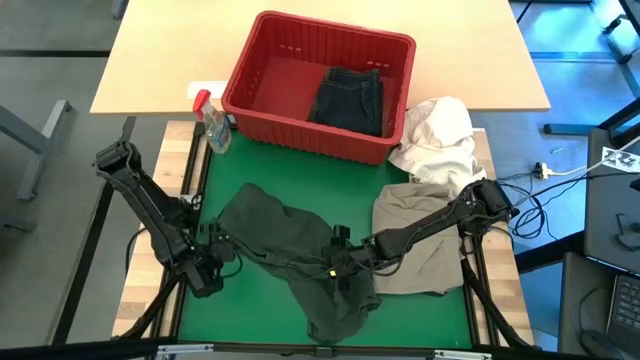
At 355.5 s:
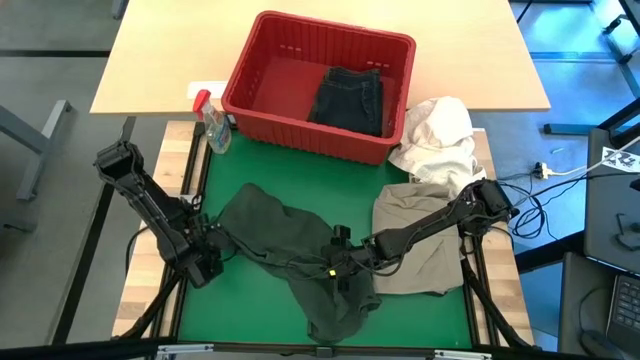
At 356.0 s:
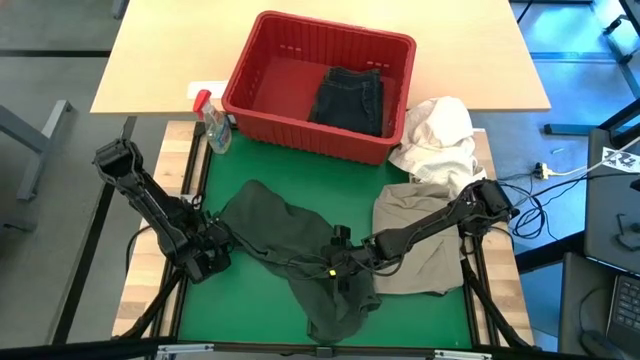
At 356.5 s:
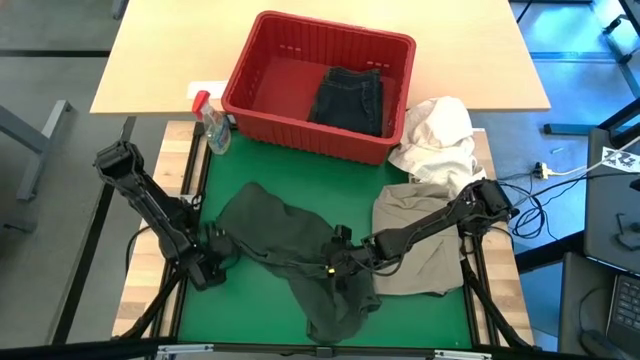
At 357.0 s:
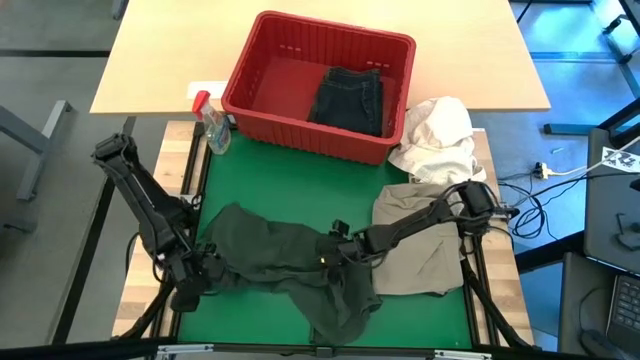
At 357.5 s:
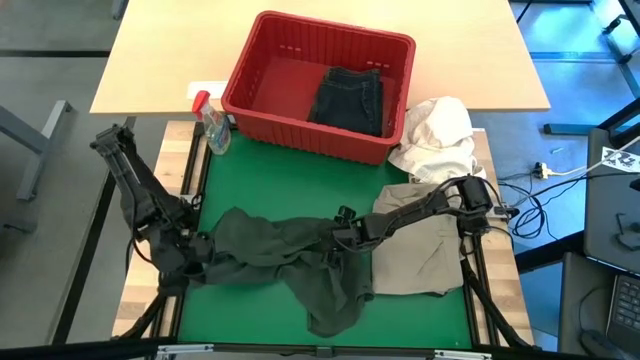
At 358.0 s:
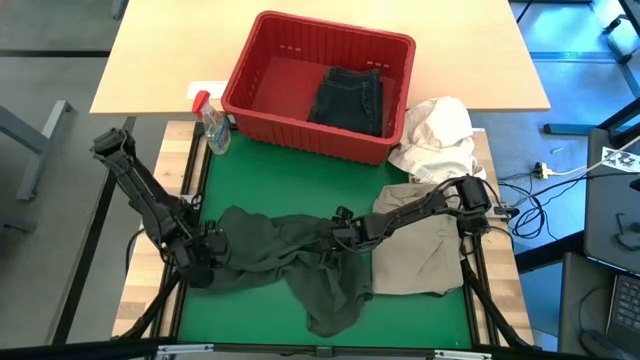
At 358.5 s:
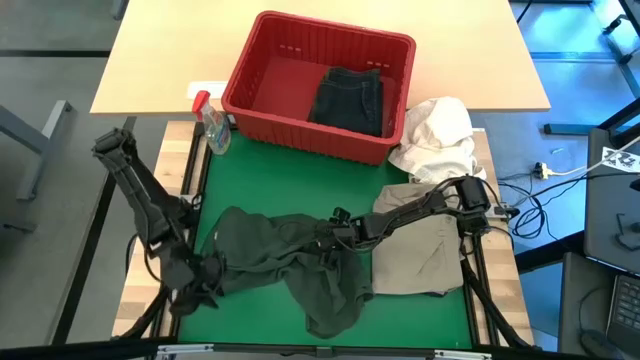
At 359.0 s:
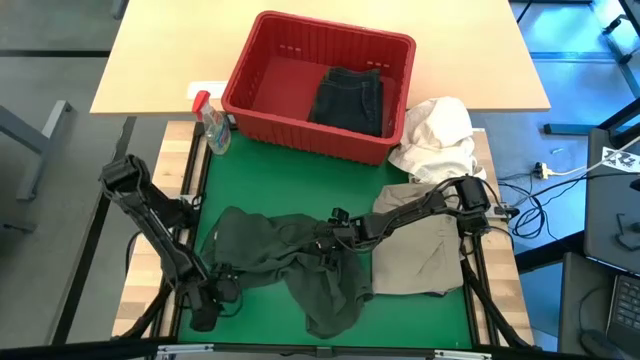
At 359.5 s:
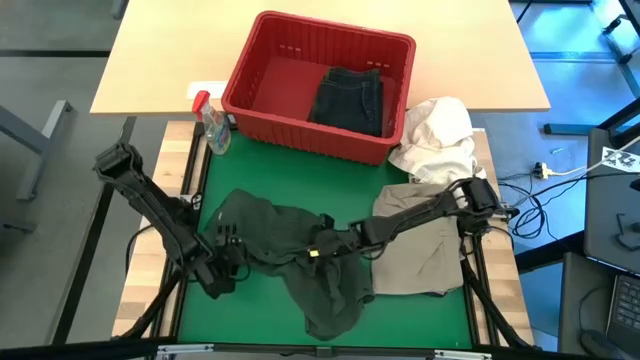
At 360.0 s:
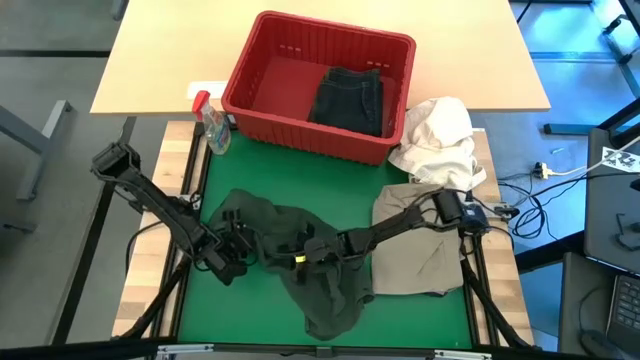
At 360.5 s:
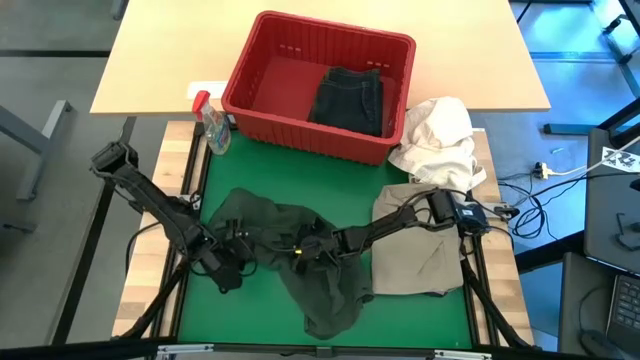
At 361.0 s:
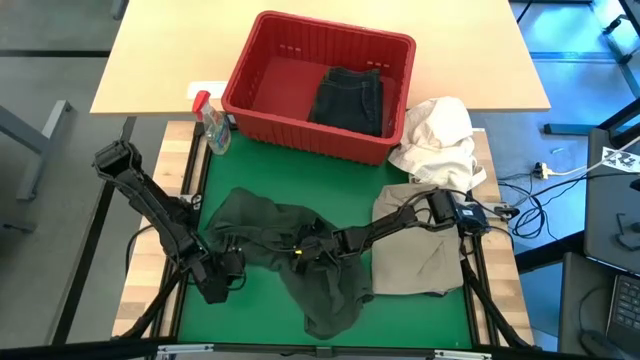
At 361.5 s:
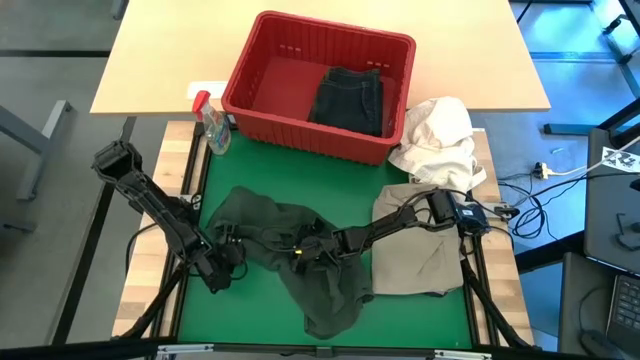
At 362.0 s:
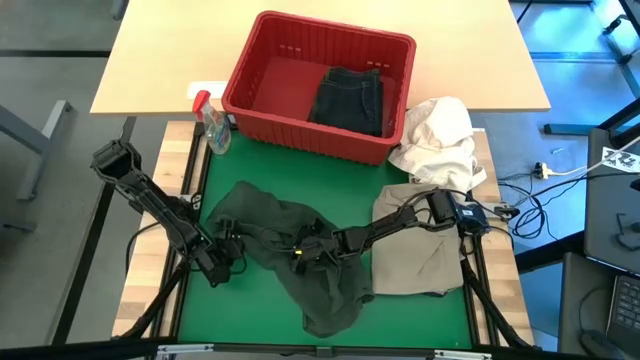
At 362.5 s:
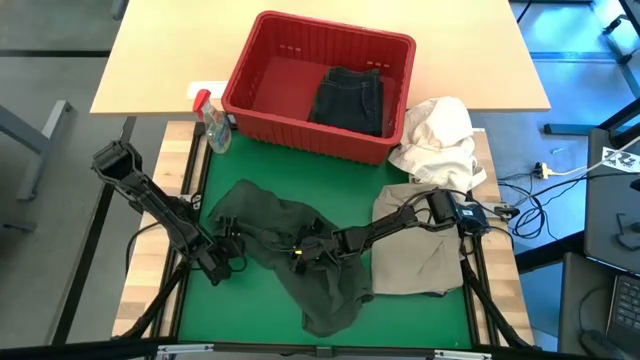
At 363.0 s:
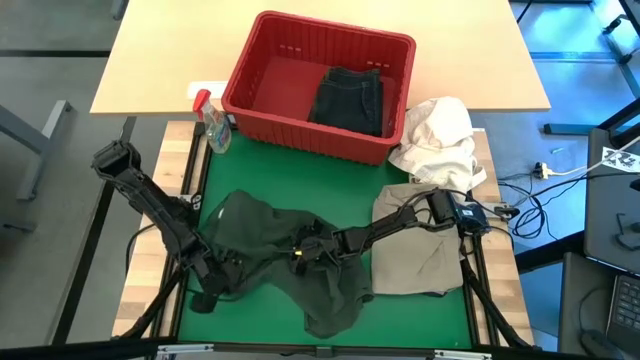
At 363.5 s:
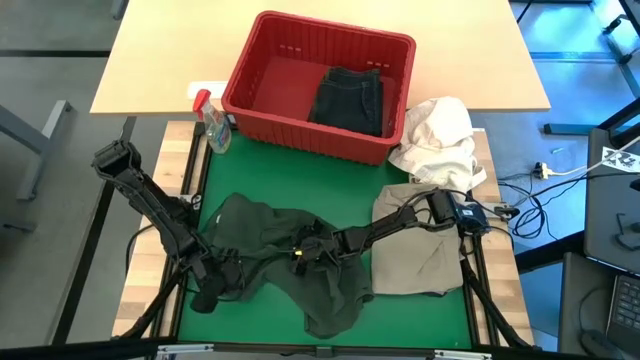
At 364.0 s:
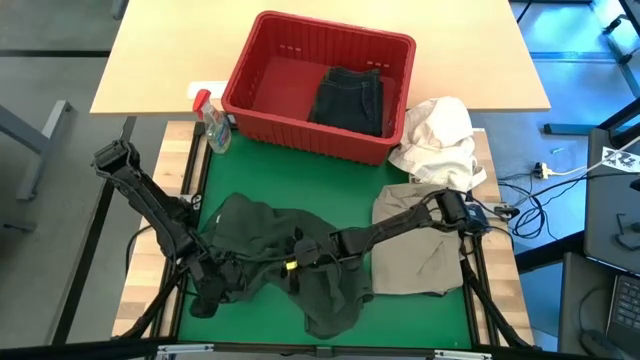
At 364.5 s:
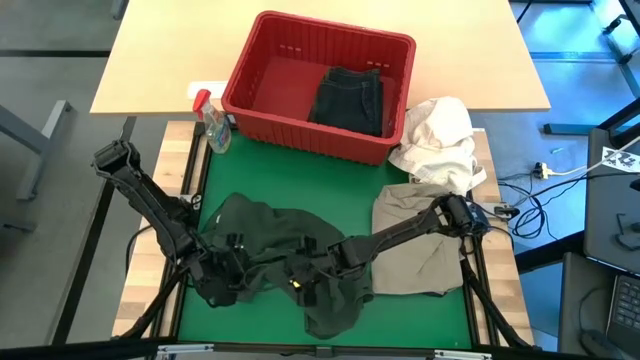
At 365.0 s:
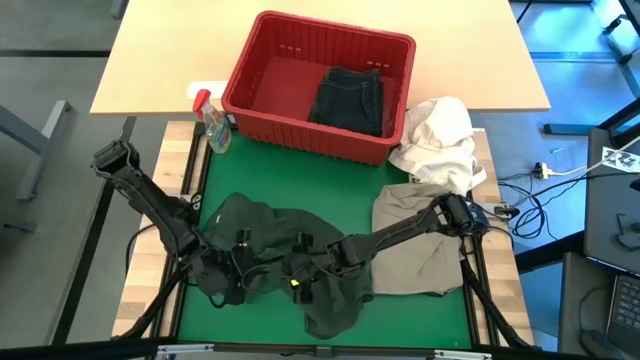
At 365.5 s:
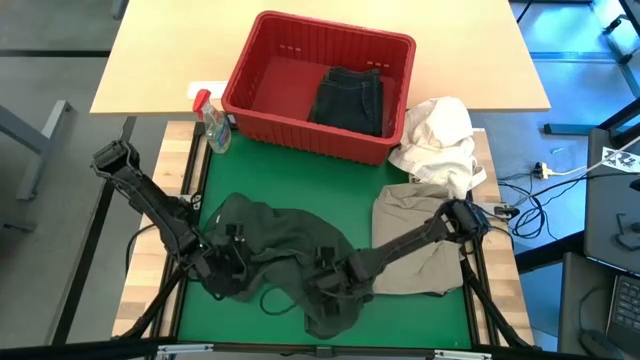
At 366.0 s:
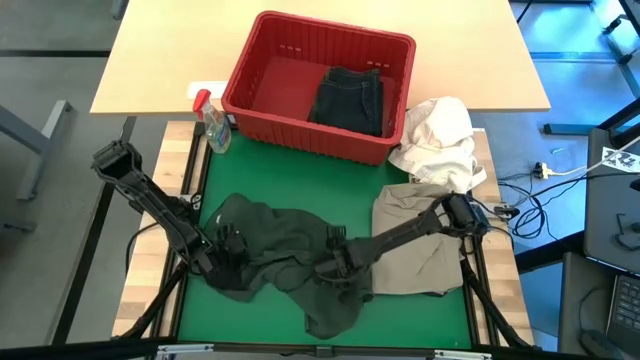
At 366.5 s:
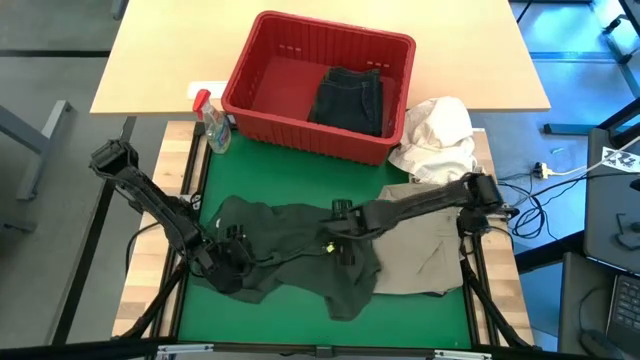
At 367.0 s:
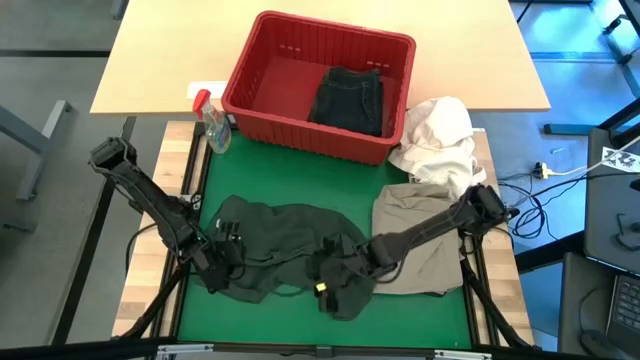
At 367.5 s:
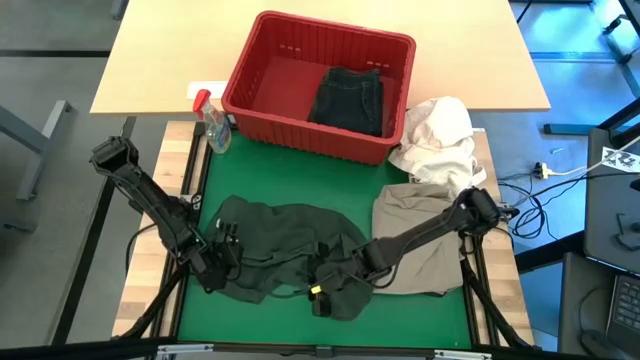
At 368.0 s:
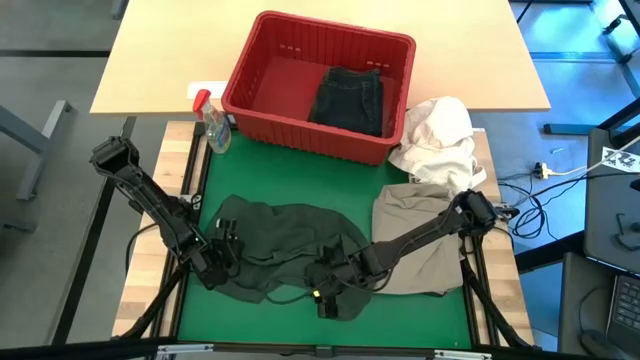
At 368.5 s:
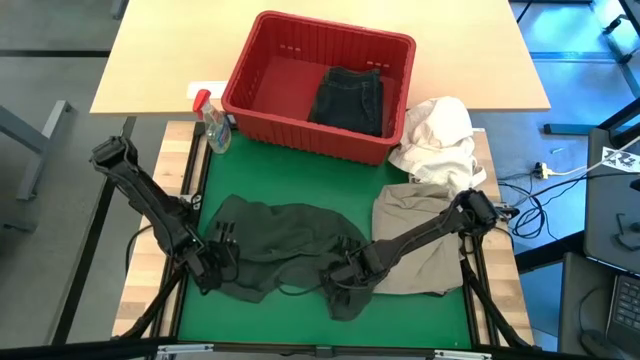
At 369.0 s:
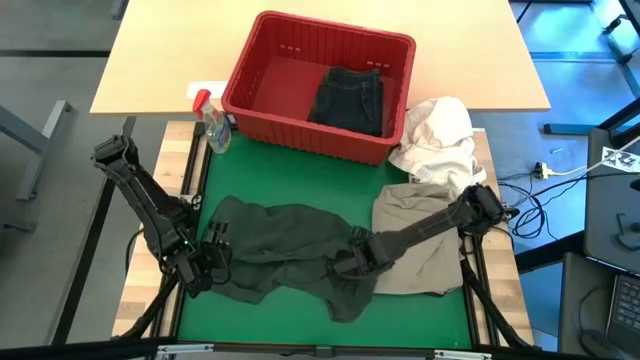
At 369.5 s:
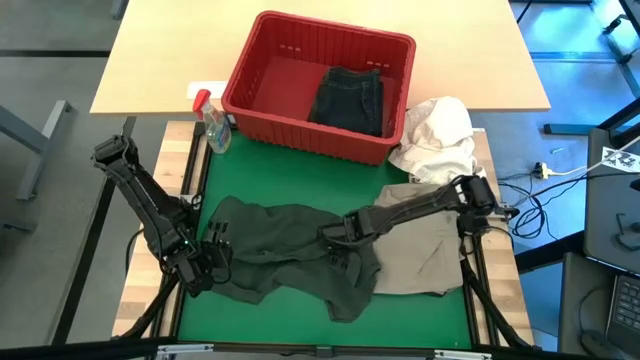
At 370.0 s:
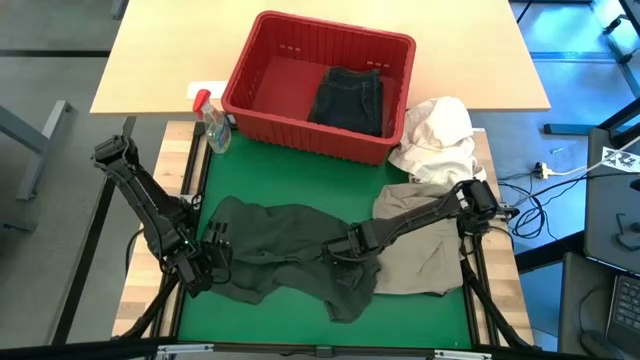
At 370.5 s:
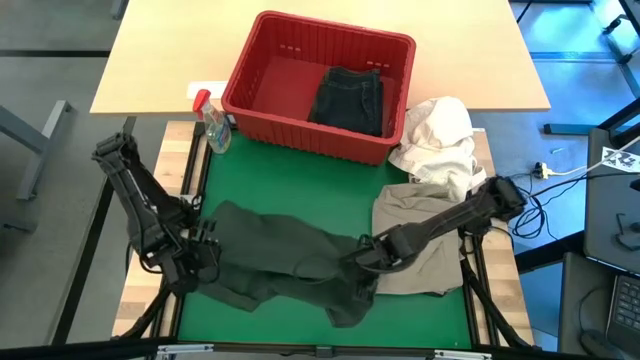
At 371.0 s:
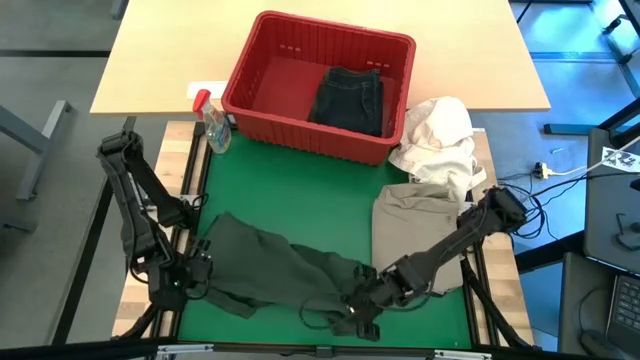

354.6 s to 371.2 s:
Task: Fold Laundry from Bin
Fold the green polo shirt

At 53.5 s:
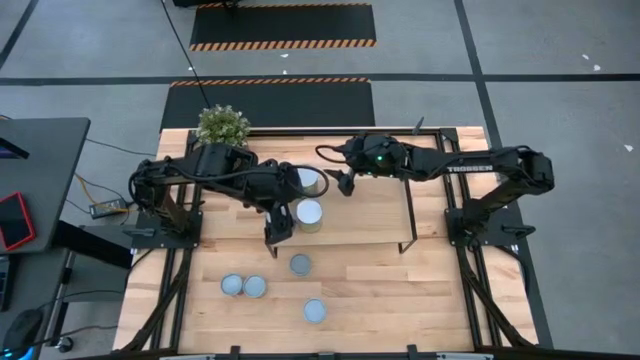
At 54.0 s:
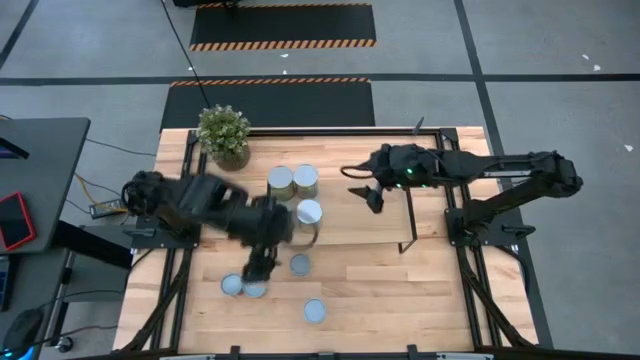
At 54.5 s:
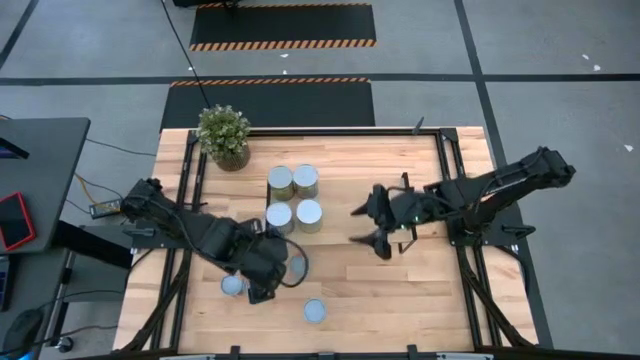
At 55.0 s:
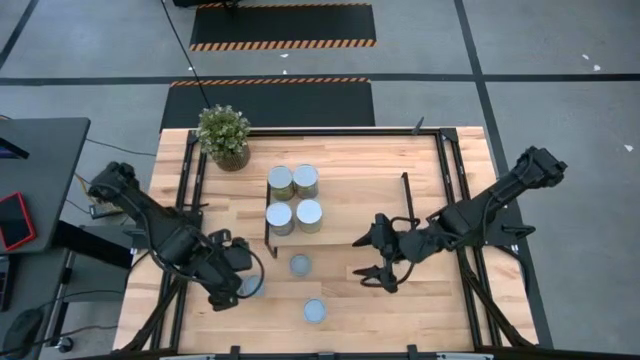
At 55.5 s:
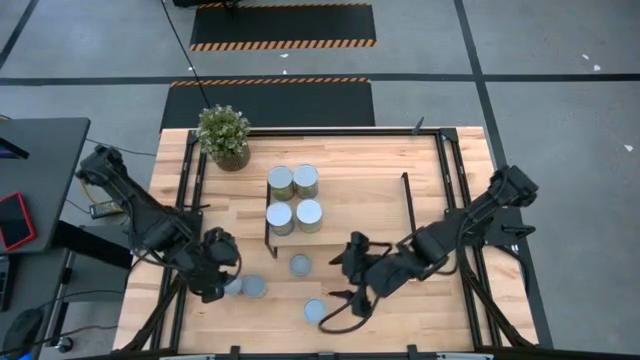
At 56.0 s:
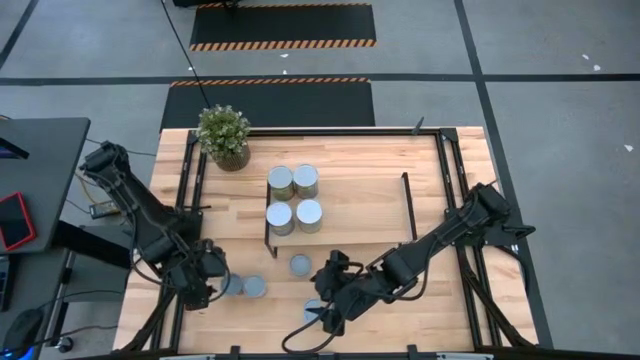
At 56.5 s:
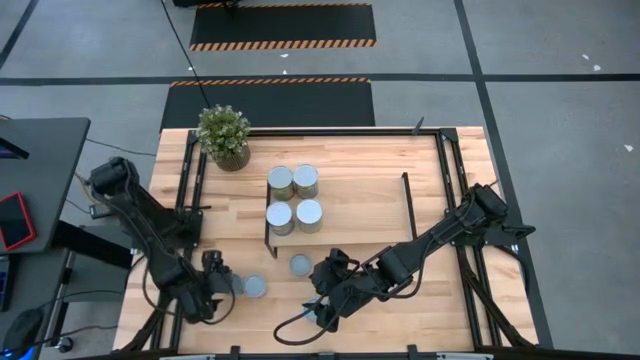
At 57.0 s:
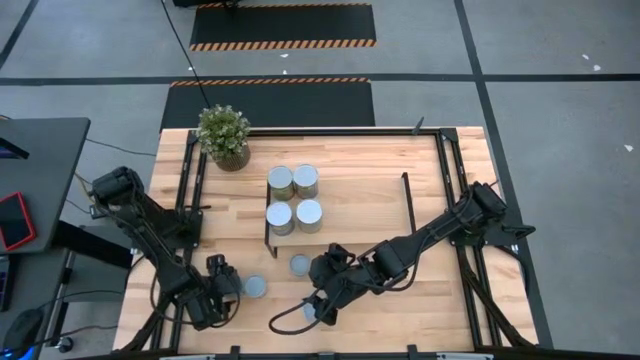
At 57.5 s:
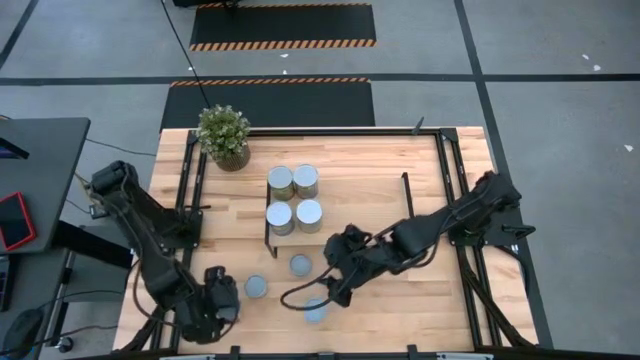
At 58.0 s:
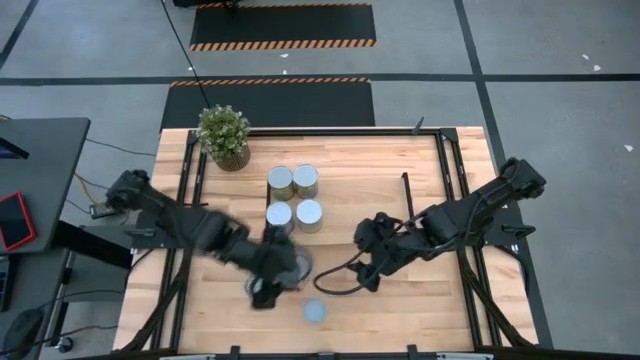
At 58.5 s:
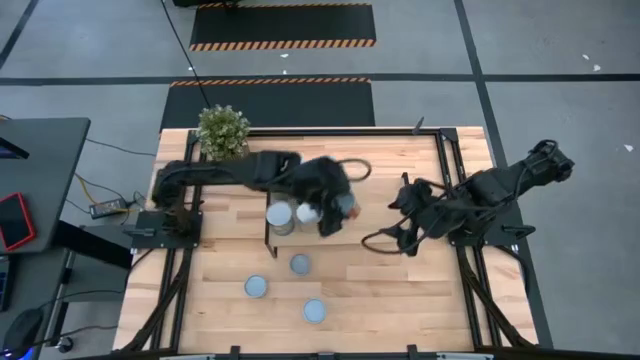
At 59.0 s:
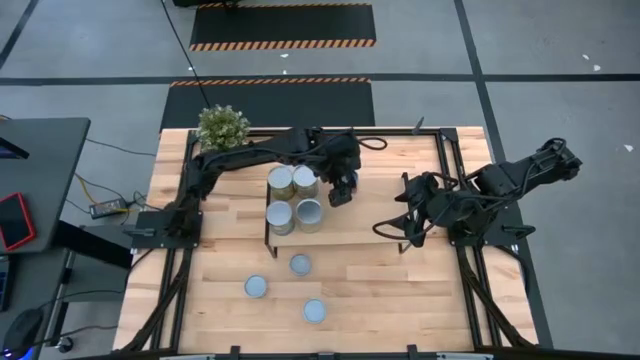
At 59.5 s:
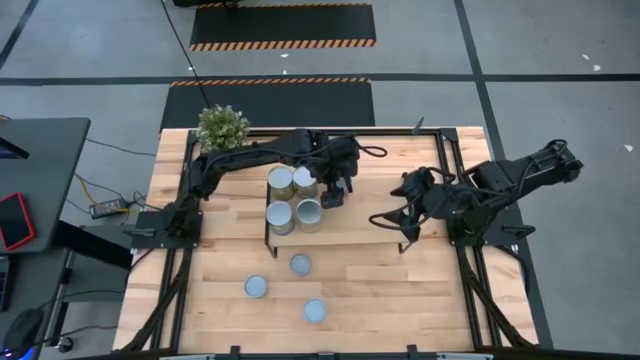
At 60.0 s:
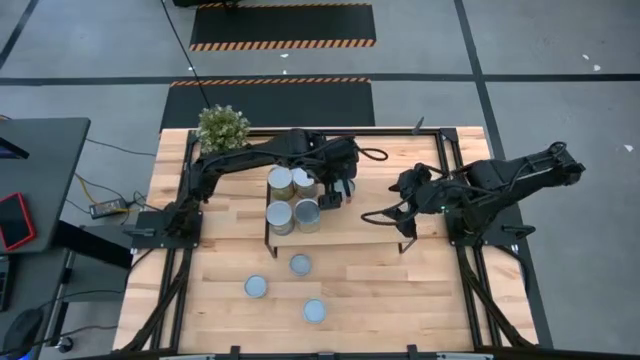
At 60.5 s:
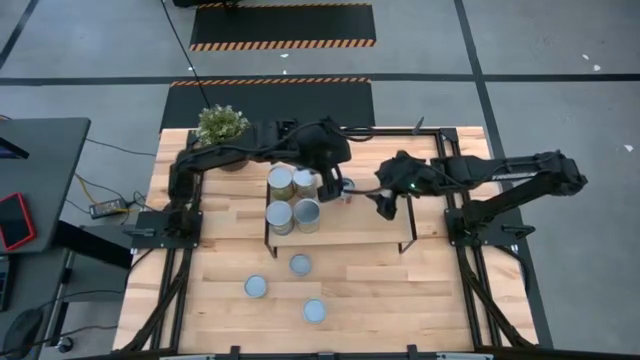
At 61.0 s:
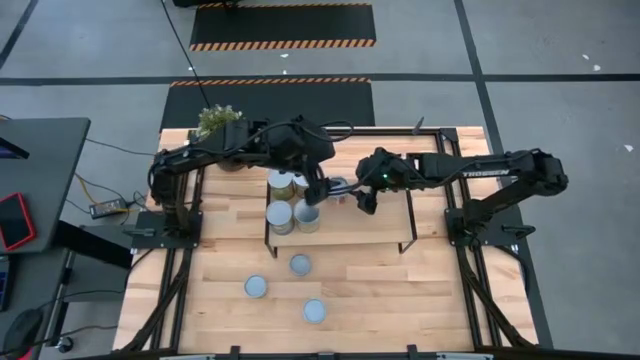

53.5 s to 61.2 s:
Task: Pick and place cans onto a shelf
Put the canned diced tomatoes on the shelf
